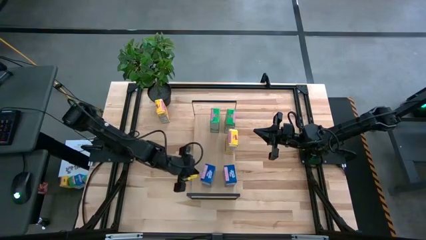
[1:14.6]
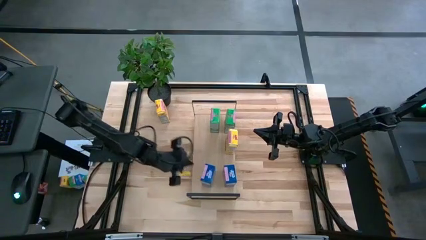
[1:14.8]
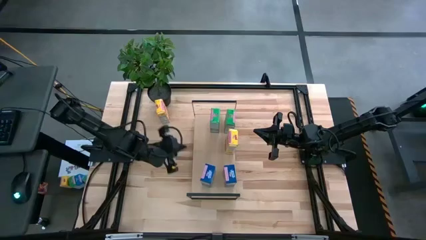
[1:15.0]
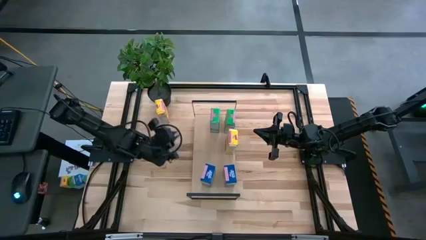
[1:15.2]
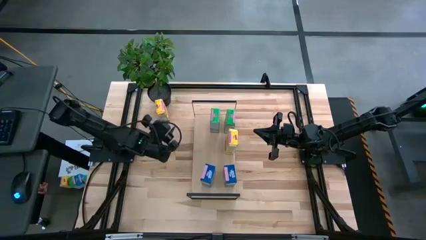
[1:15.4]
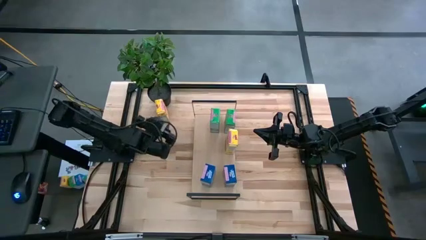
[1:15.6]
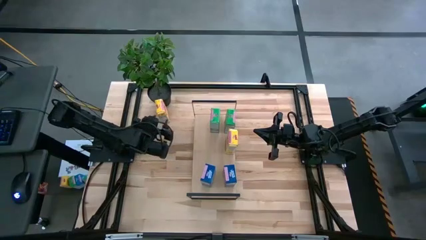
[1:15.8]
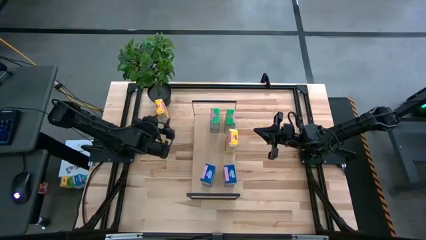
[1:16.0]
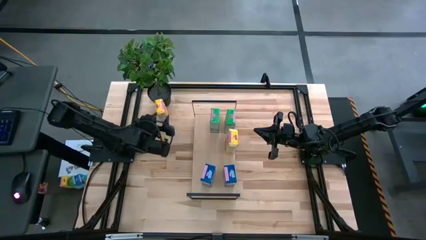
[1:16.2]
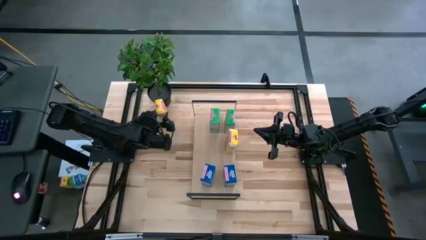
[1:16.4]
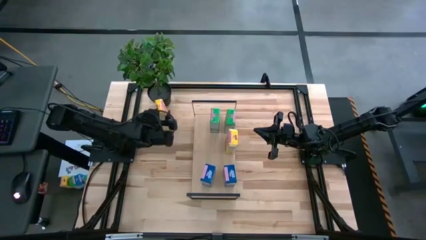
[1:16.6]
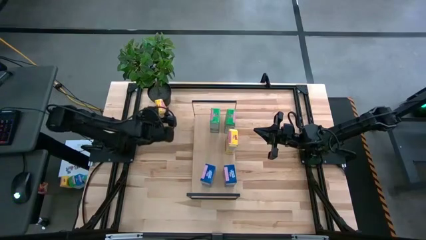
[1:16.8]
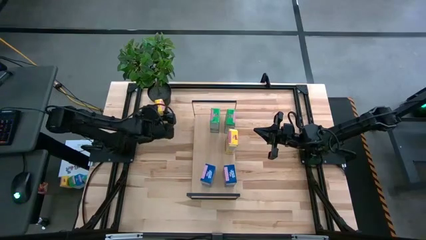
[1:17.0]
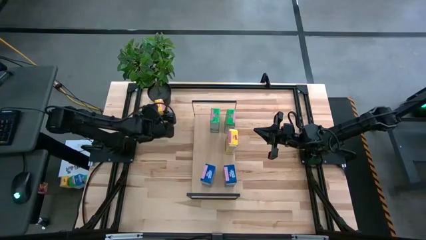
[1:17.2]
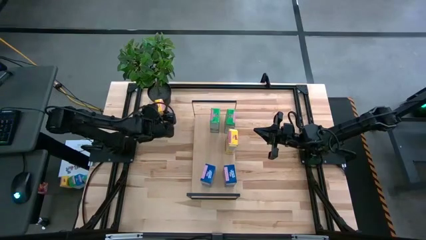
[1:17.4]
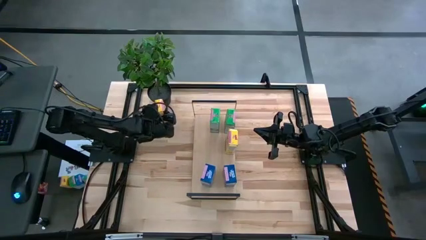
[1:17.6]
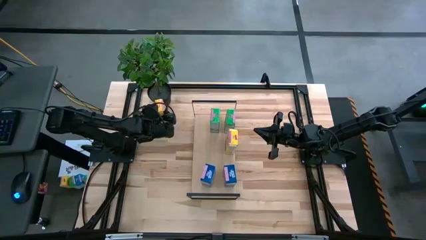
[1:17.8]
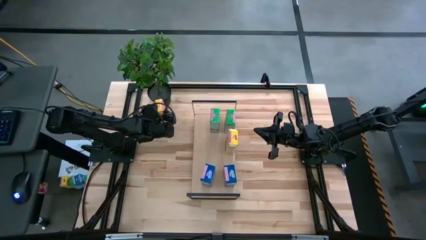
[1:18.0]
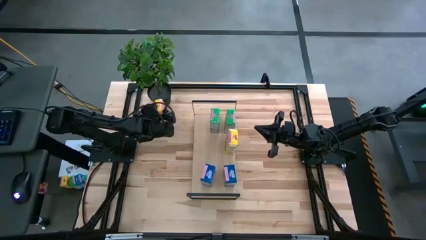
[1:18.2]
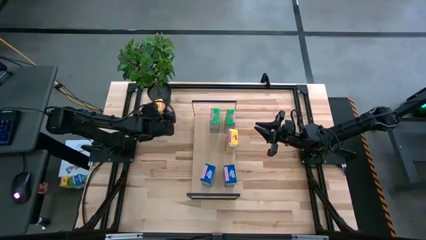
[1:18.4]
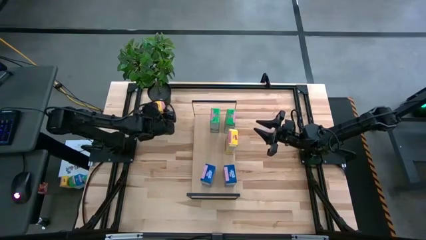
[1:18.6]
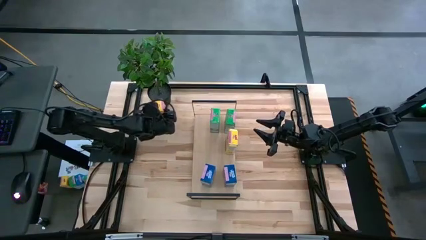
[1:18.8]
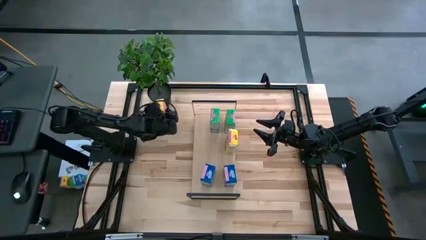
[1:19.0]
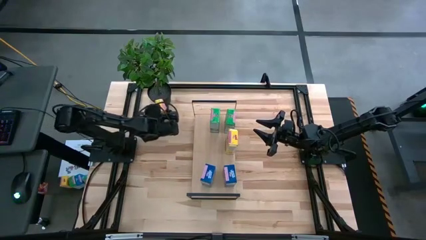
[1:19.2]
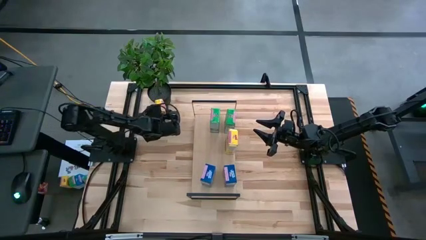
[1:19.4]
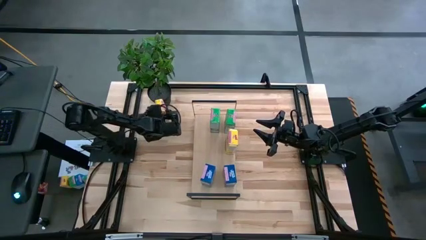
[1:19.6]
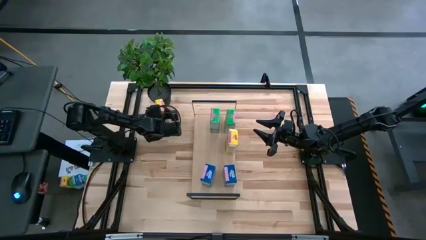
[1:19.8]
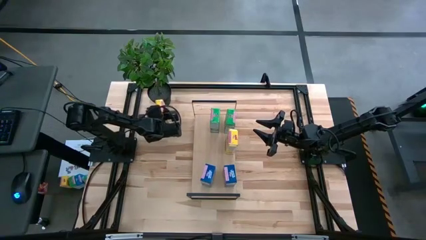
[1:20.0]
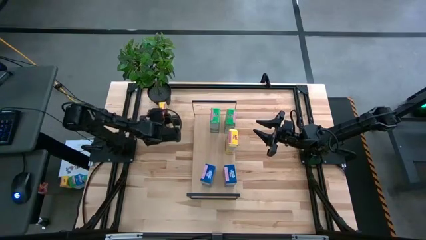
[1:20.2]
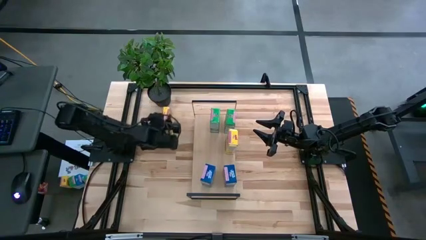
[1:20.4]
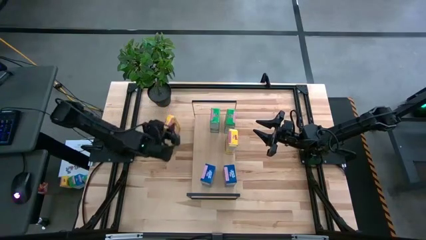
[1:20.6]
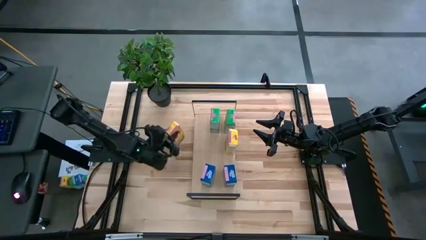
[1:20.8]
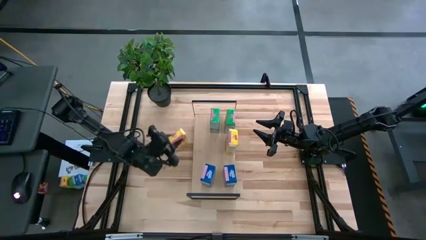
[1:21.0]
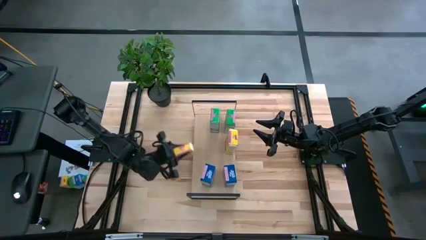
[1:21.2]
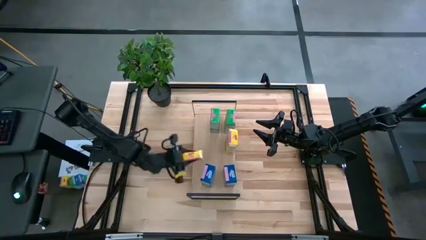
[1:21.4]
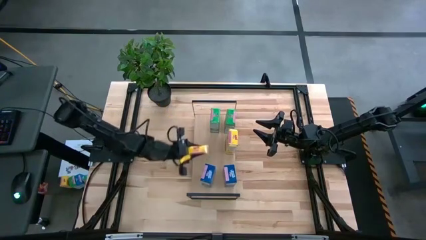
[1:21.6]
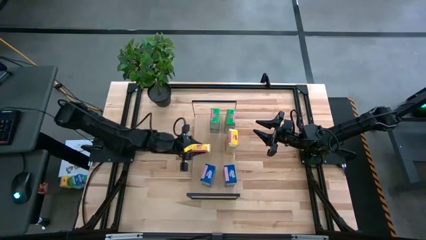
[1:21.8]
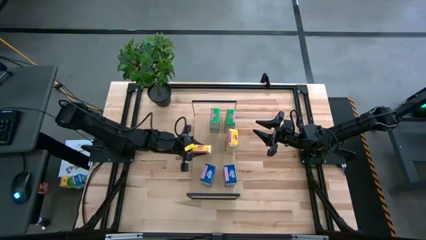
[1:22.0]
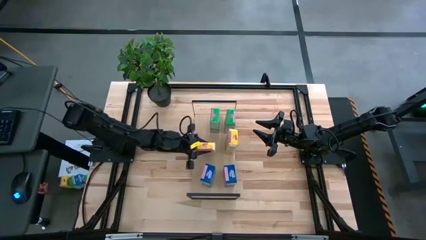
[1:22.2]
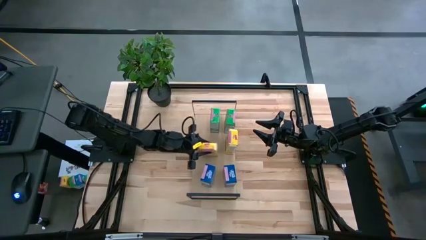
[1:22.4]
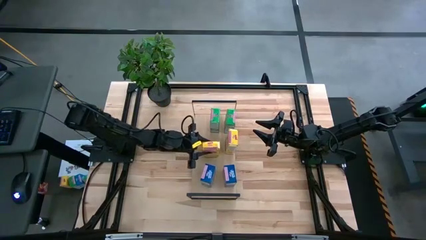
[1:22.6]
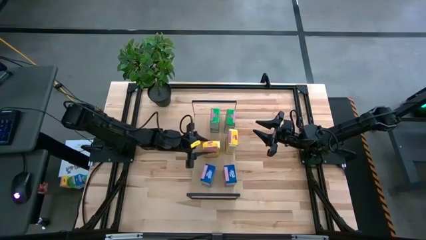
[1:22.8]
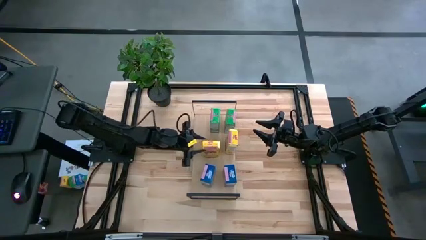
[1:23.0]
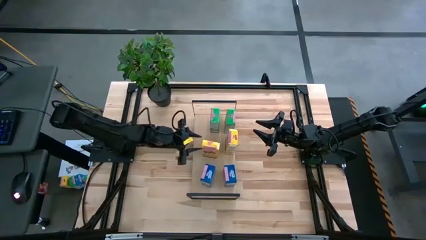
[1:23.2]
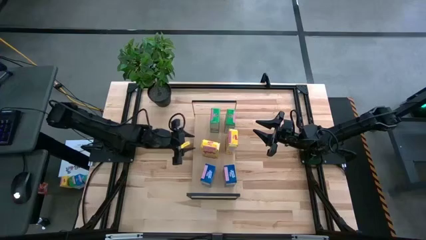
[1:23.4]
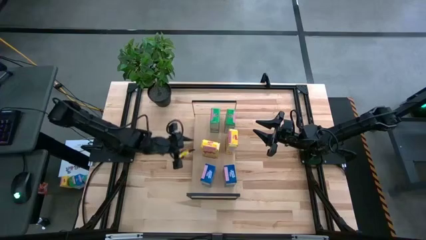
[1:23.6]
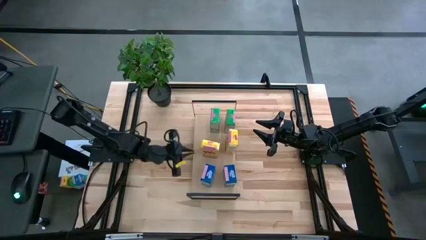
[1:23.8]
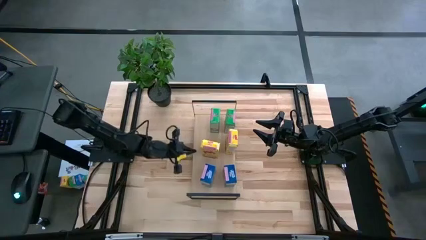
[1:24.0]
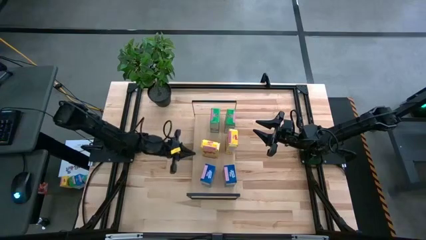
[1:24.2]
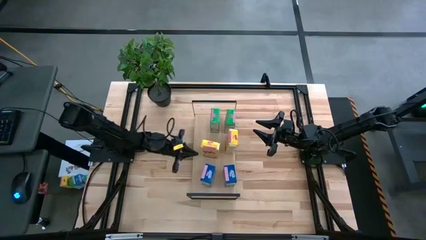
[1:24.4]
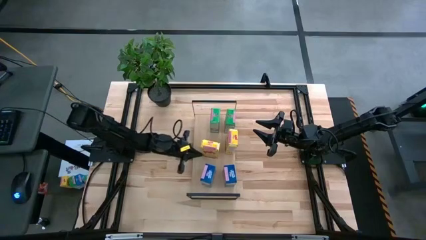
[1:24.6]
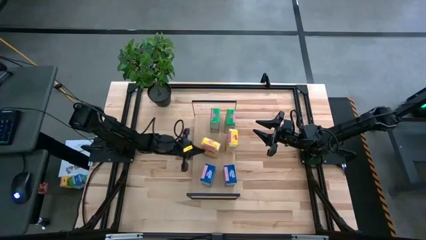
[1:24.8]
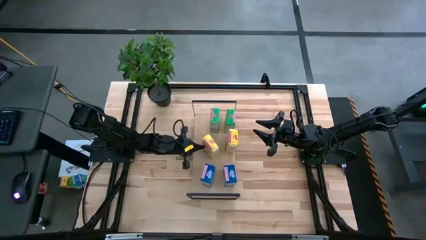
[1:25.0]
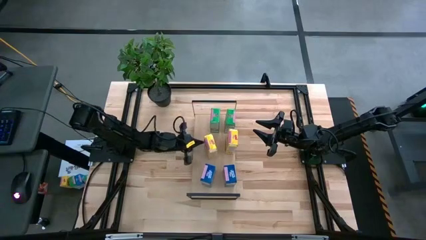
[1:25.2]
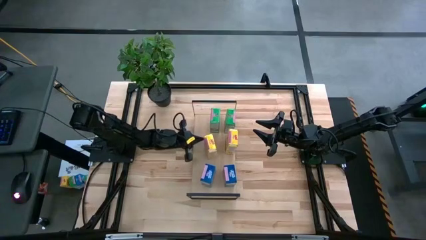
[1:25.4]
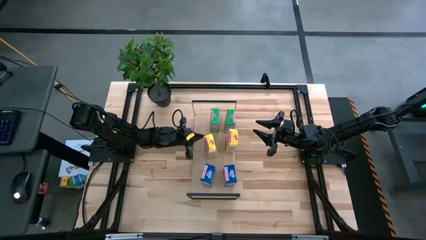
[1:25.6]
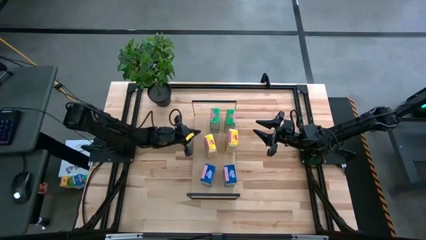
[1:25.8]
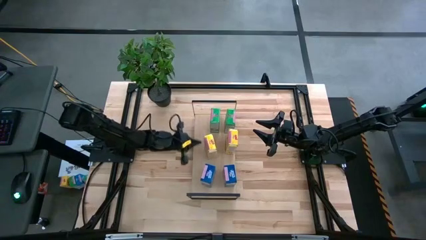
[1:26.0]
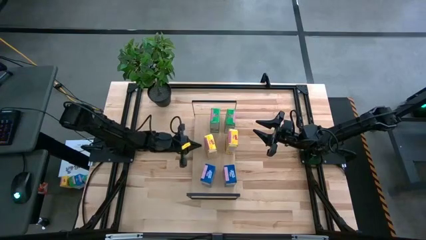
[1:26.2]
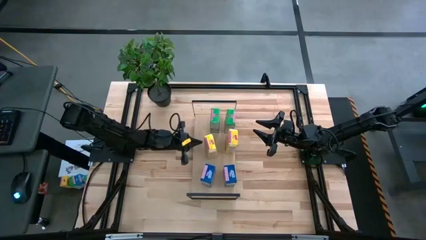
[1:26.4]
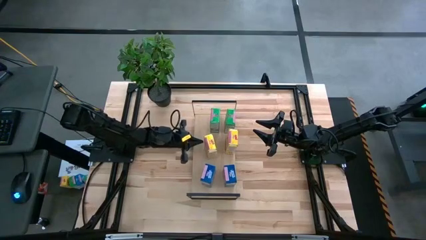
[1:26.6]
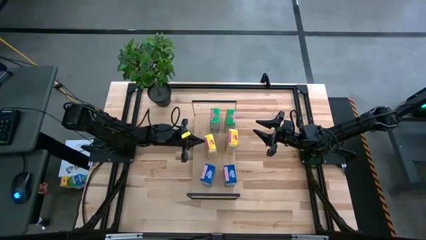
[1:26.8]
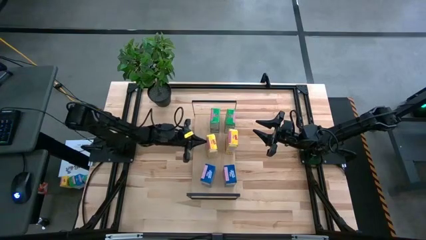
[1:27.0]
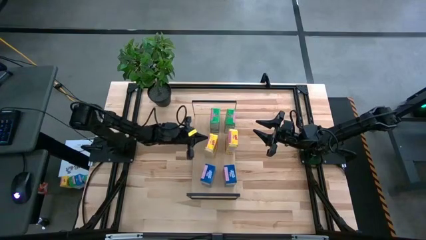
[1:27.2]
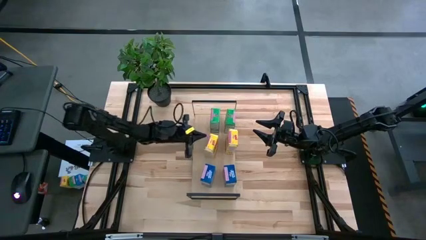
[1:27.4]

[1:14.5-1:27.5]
Task: Stack cereal on shelf
Put the yellow cereal box aligned with the other yellow cereal box on the shelf

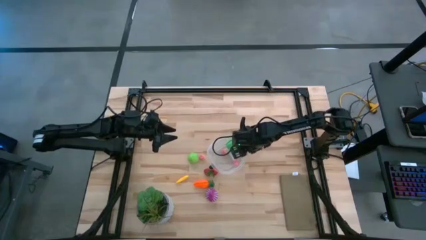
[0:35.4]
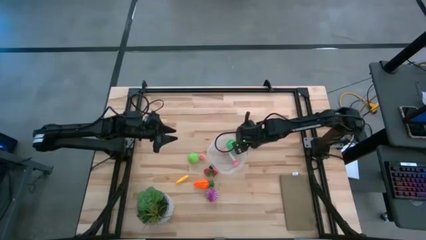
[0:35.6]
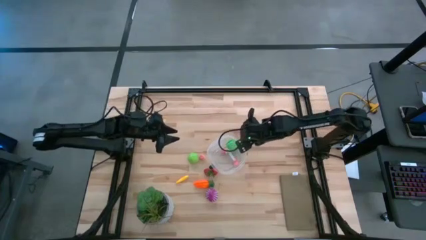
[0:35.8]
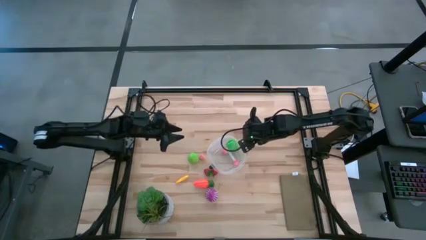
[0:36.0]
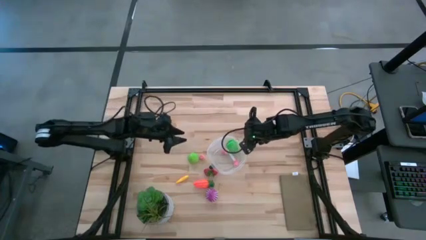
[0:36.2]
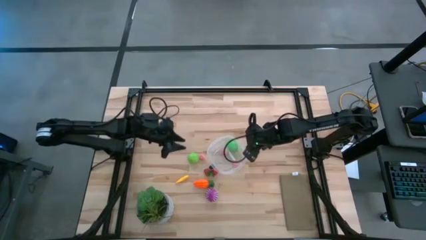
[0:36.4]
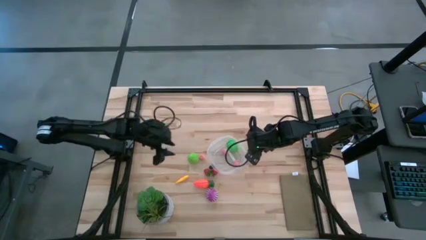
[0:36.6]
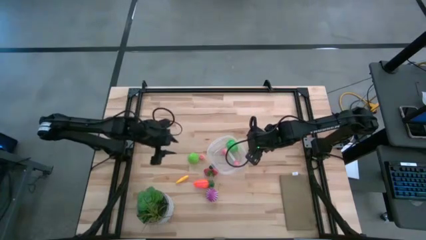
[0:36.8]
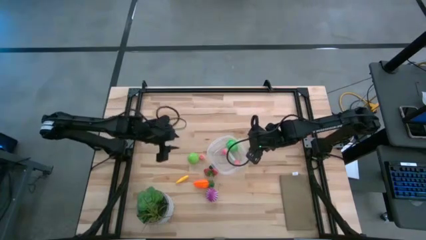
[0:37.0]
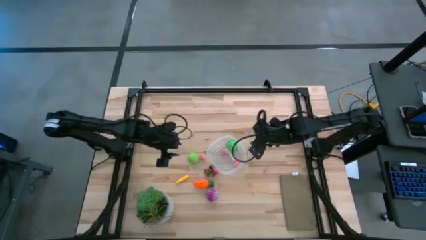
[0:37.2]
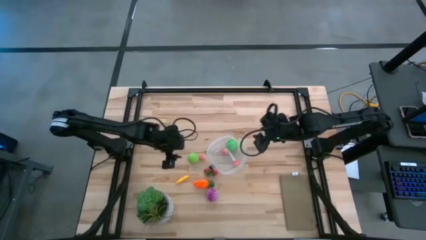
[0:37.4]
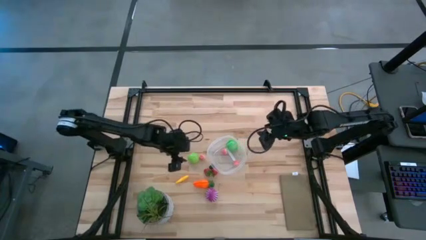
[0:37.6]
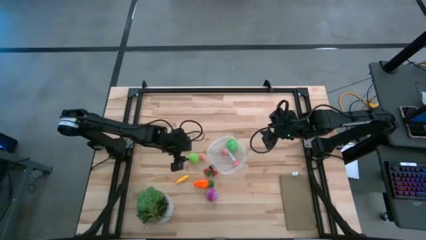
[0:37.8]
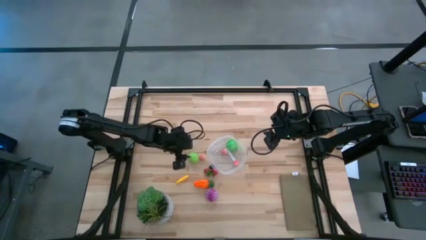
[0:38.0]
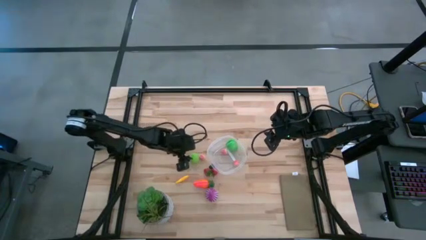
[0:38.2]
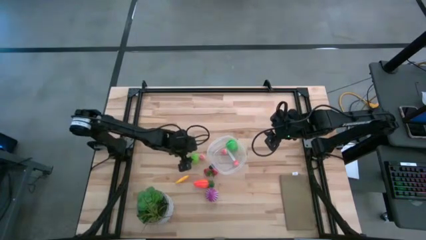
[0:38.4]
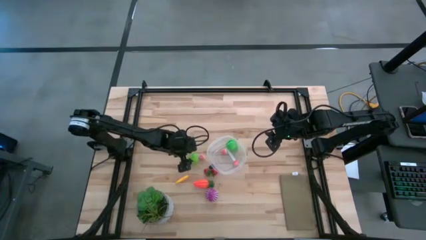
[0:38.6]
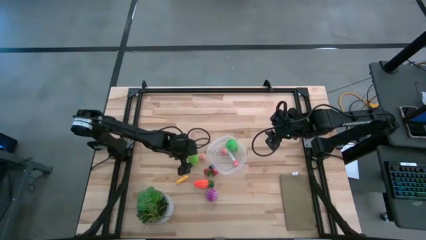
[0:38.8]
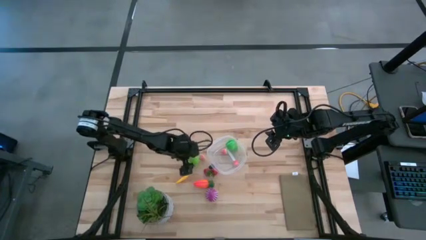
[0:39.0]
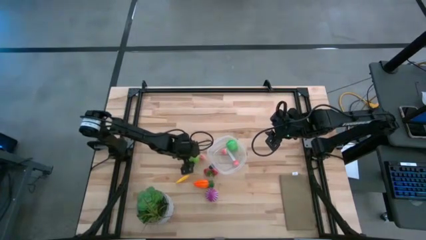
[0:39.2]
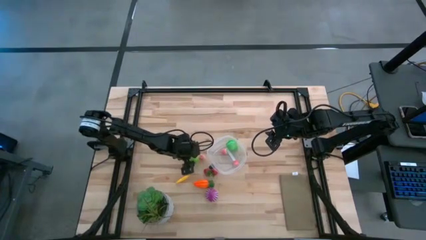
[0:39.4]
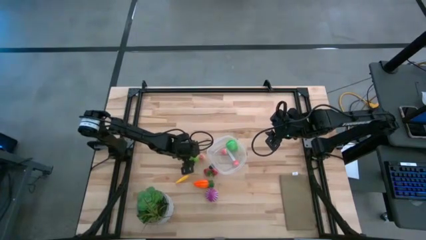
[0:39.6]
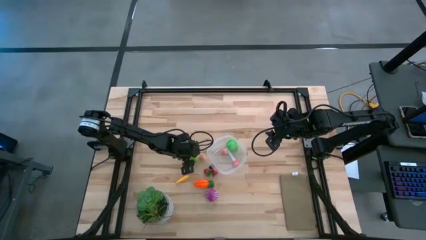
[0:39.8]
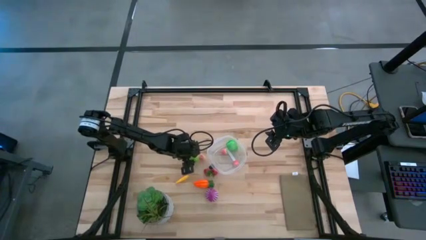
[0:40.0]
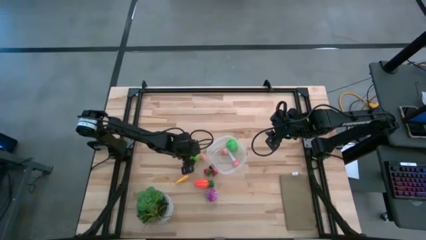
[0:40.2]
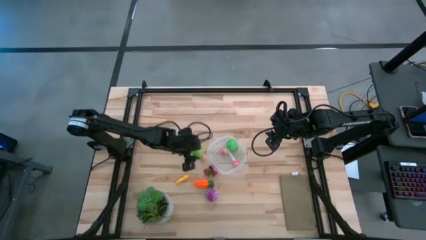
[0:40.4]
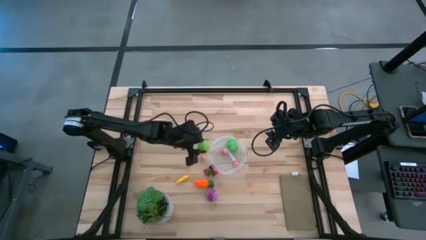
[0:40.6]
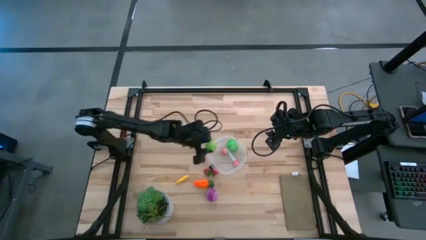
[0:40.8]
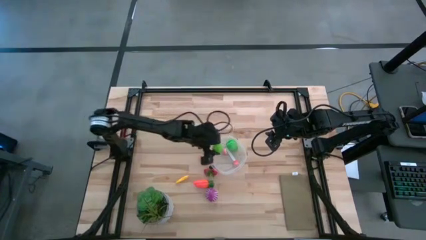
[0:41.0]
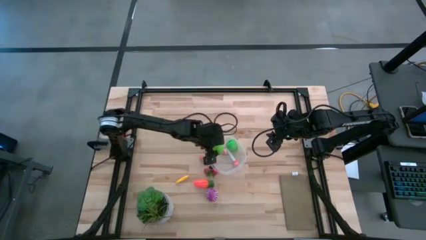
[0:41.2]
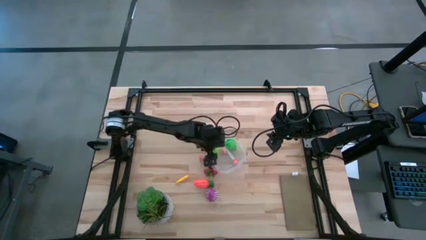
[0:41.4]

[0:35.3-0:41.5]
Task: Pick and placing Produce into tupperware
Put the green cabbage into the transparent bin
